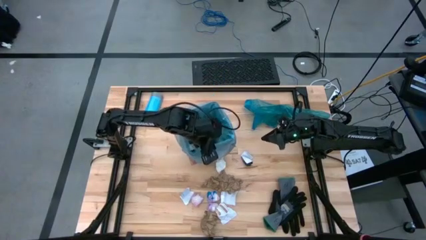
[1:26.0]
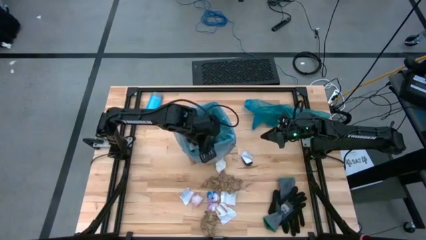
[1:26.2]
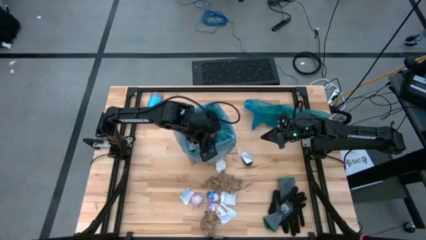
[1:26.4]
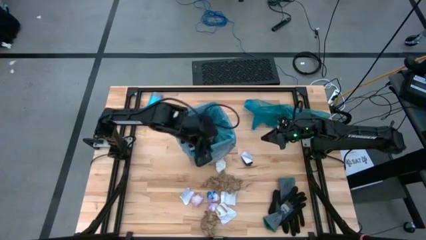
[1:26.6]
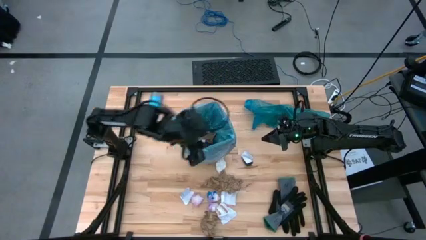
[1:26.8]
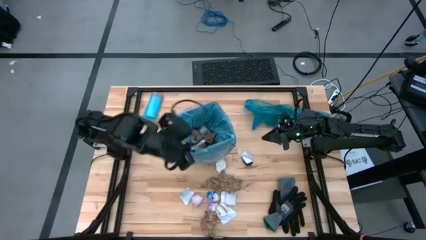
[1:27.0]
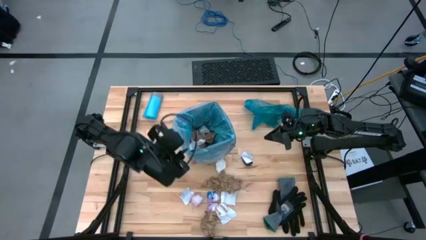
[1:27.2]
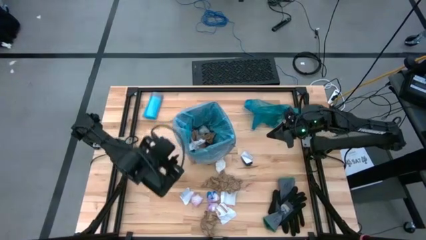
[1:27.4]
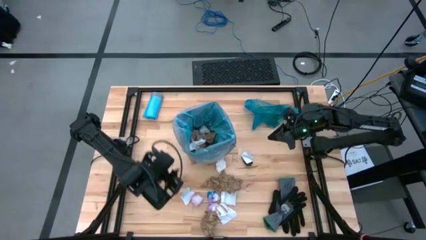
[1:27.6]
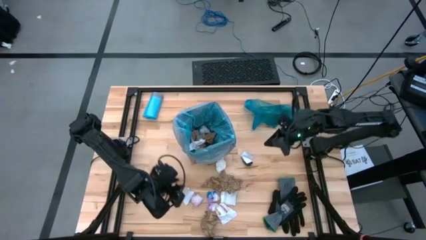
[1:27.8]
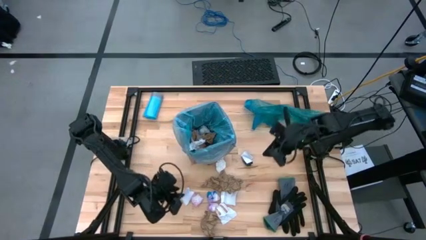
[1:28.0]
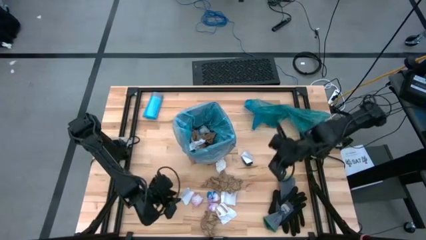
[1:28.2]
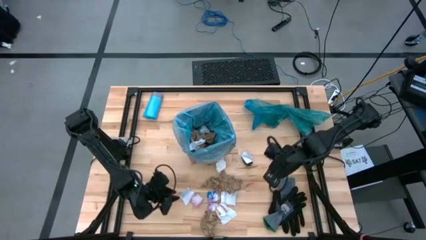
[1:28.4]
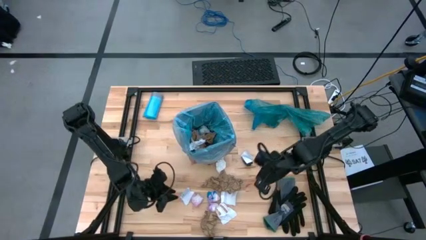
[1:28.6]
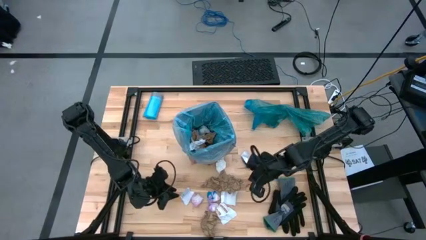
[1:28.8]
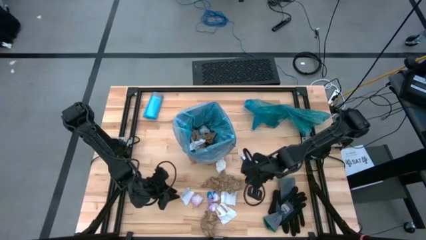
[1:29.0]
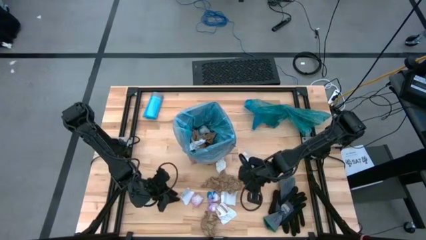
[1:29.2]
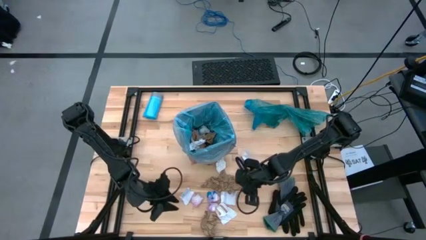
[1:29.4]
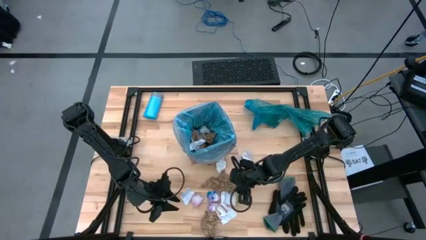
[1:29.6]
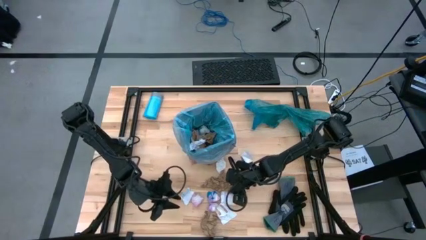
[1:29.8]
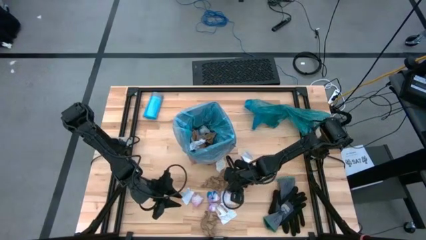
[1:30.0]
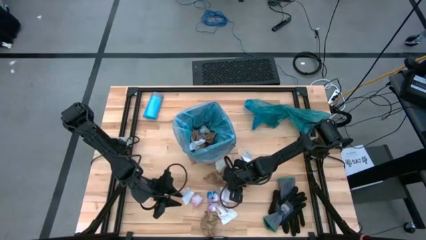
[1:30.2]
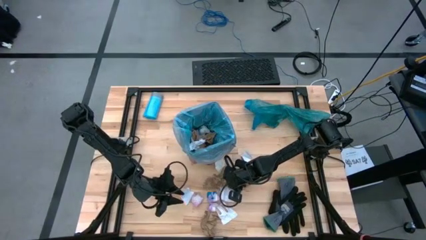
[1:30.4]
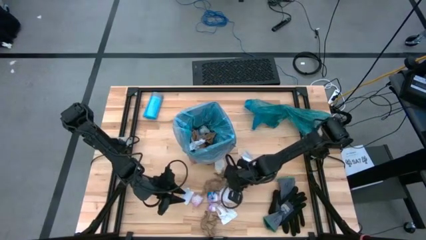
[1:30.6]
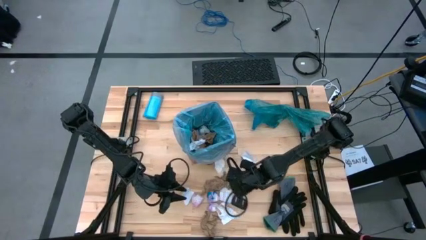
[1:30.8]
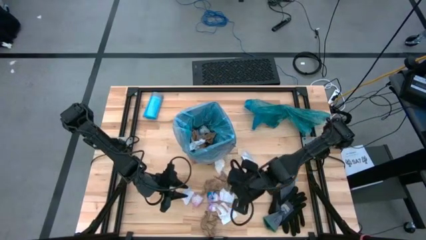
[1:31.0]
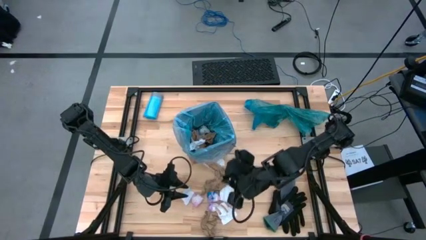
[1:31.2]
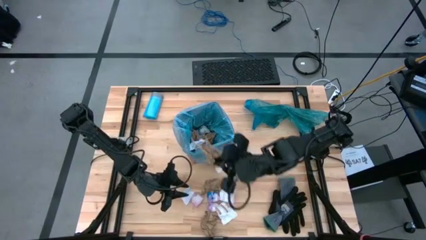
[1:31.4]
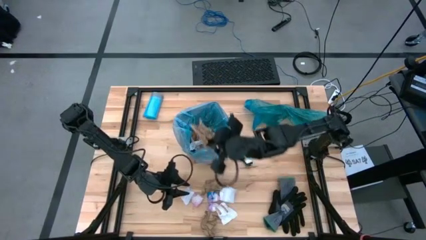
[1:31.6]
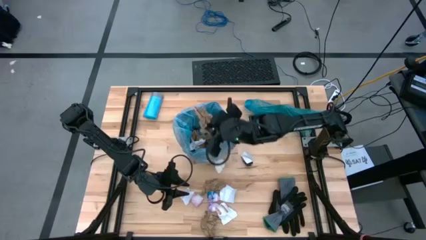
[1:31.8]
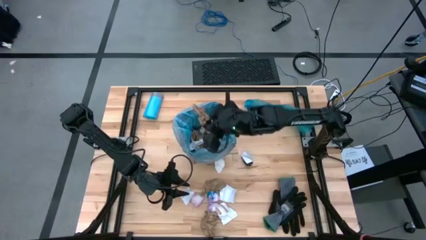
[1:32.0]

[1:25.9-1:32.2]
Task: place trash/remove bag and relplace
Put the brown paper trash into the trash bag

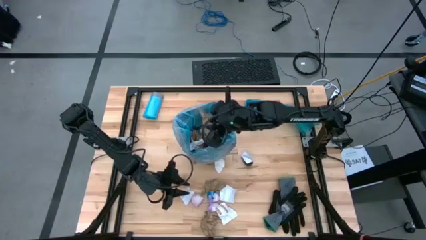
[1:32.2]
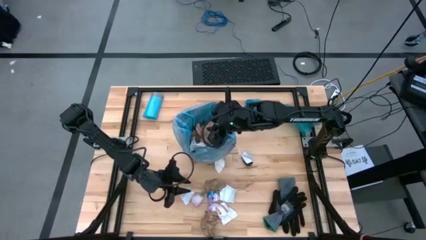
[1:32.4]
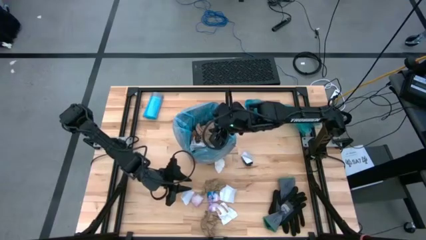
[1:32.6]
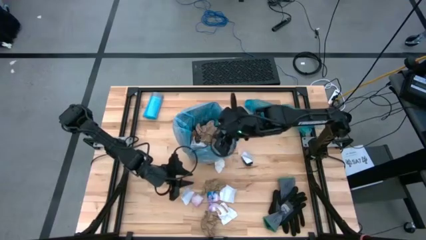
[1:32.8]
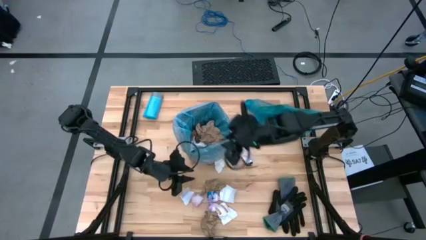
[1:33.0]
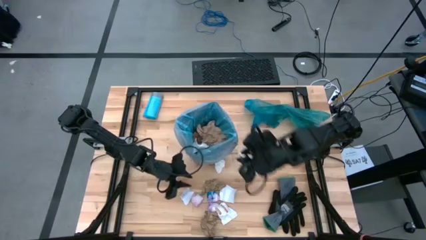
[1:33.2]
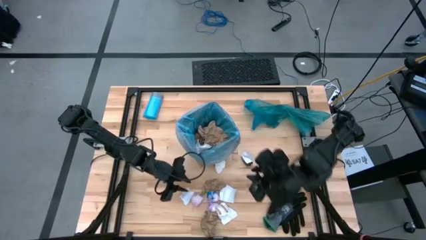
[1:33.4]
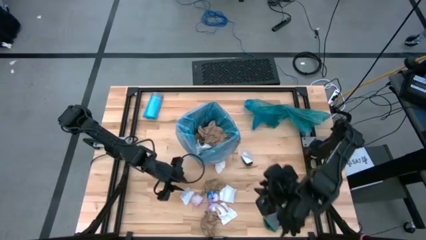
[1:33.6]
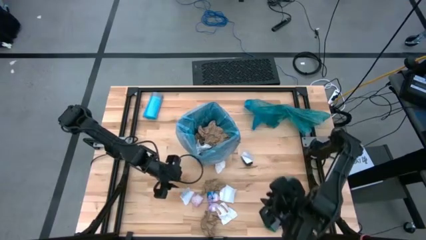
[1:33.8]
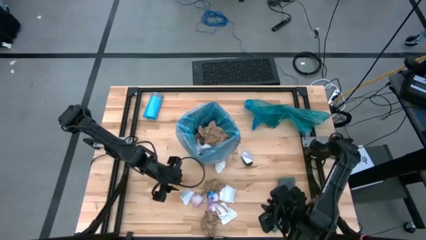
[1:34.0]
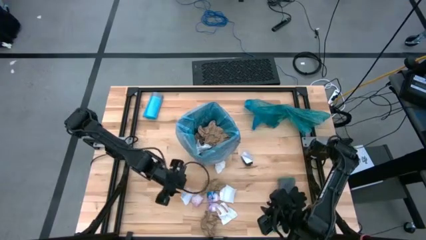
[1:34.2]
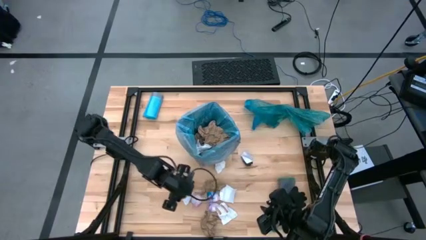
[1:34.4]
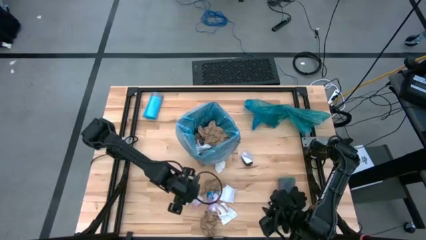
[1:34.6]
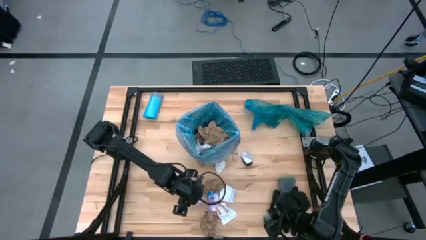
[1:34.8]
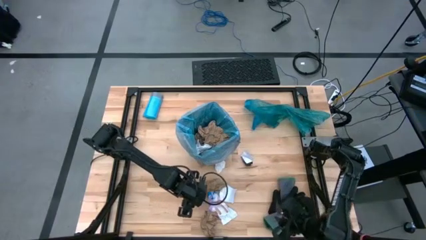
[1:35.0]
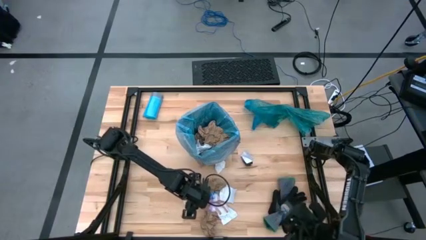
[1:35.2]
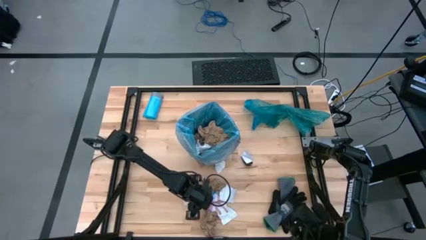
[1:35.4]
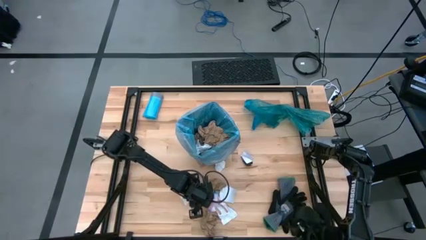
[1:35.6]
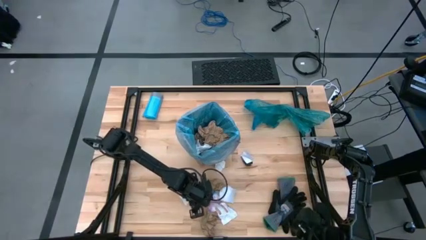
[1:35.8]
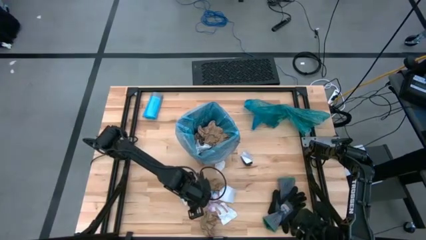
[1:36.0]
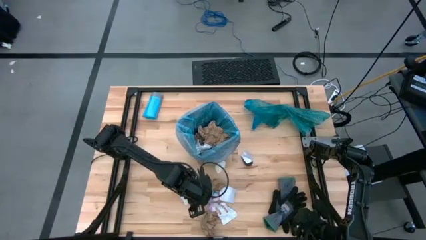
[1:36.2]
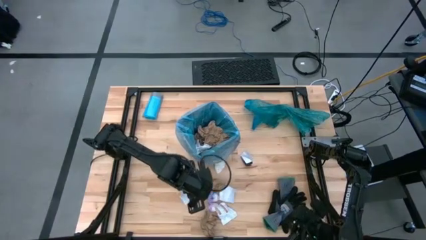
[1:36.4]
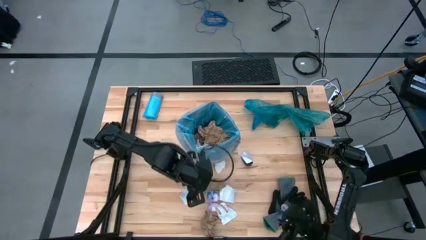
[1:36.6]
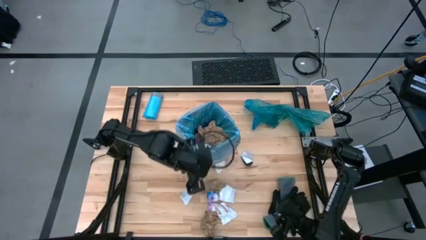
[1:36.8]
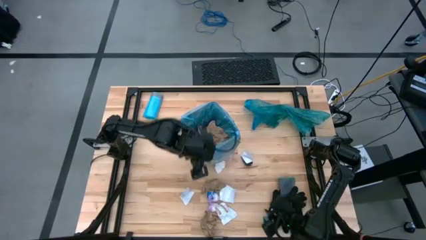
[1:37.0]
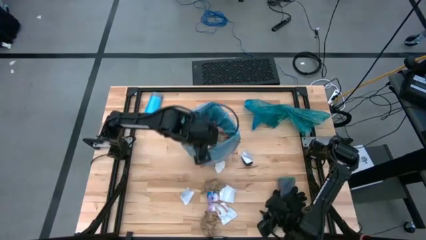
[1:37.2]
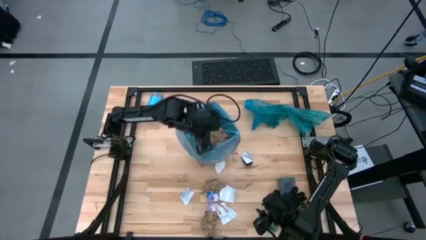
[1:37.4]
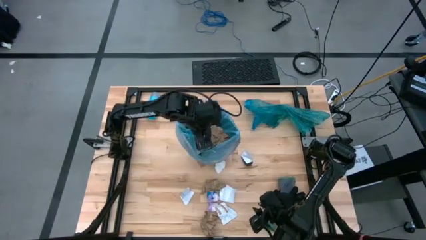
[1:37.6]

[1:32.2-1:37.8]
Put the pink plastic trash into the trash bin

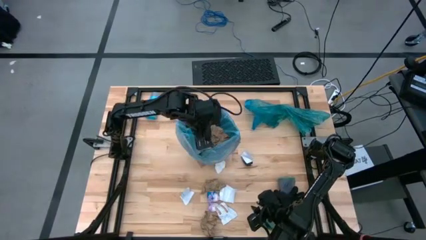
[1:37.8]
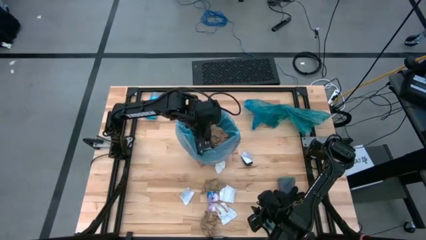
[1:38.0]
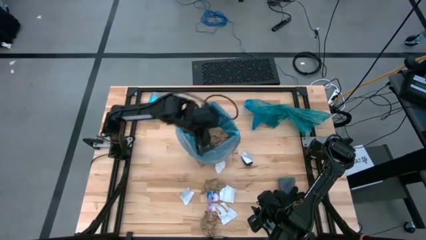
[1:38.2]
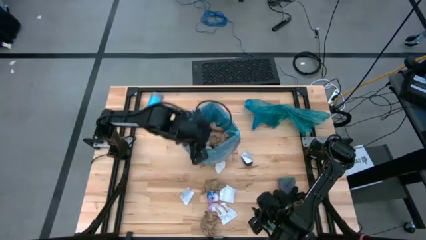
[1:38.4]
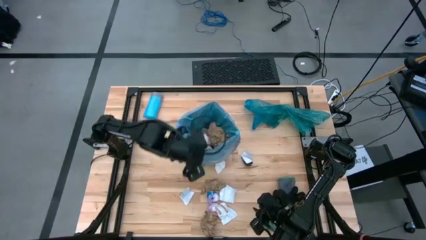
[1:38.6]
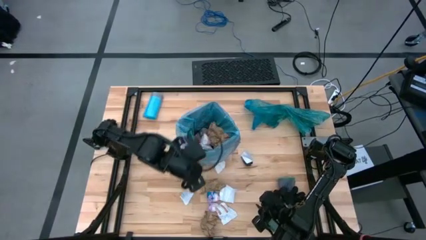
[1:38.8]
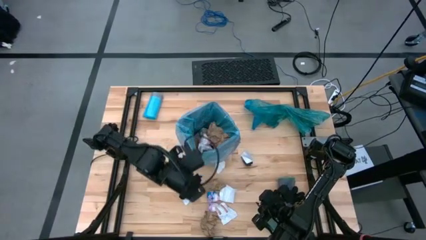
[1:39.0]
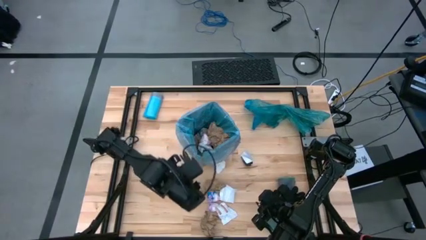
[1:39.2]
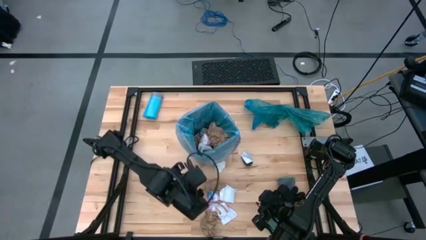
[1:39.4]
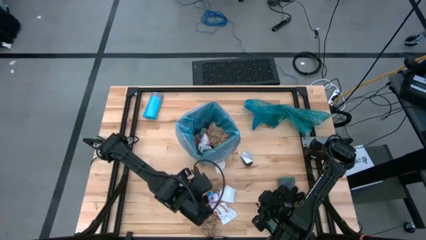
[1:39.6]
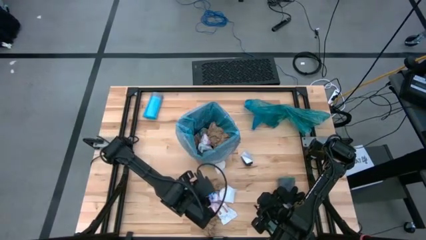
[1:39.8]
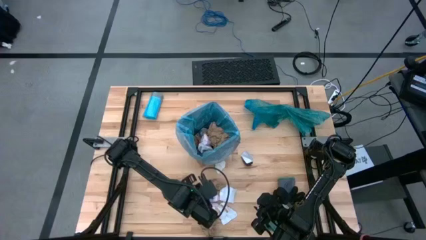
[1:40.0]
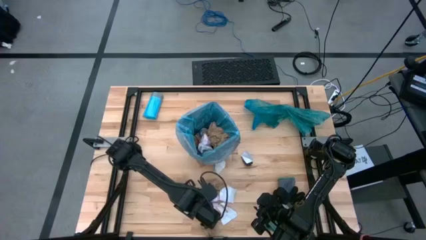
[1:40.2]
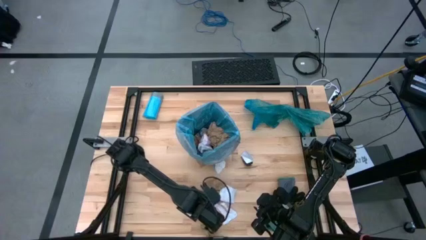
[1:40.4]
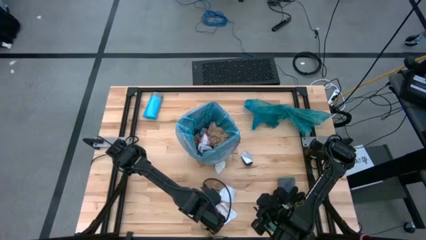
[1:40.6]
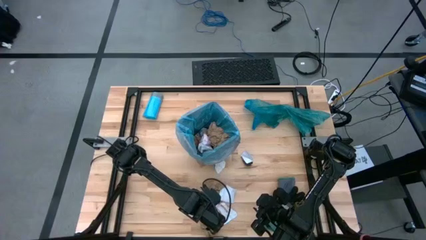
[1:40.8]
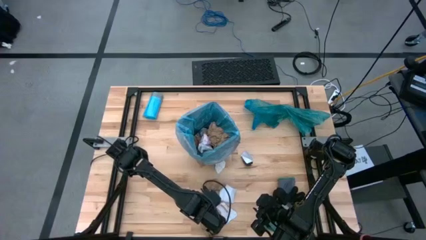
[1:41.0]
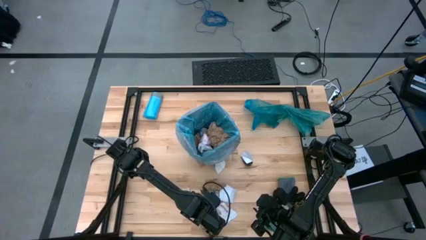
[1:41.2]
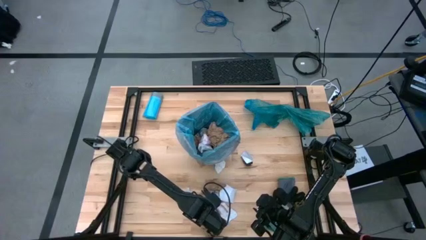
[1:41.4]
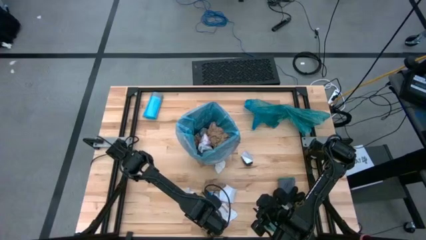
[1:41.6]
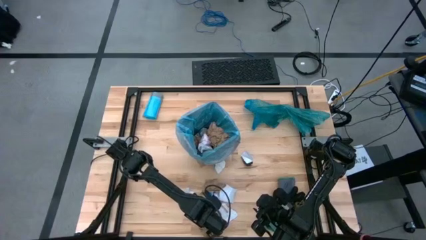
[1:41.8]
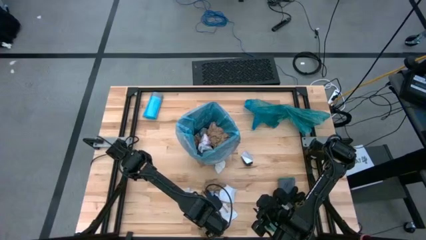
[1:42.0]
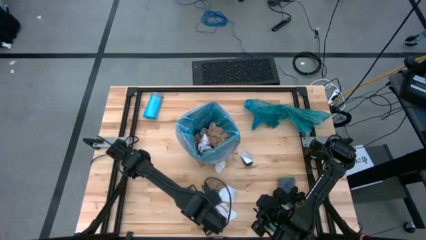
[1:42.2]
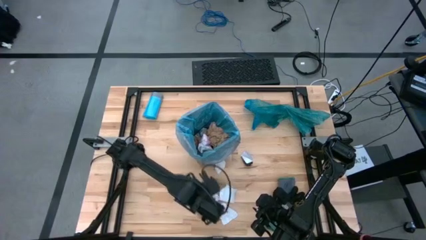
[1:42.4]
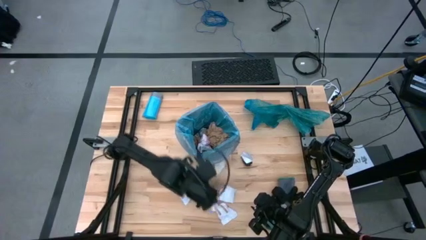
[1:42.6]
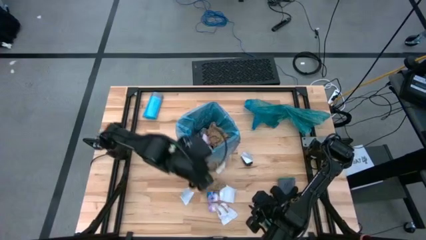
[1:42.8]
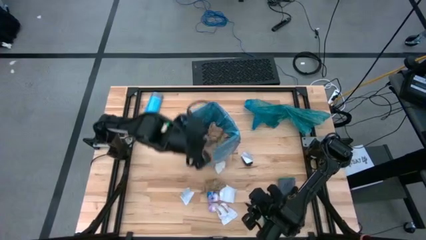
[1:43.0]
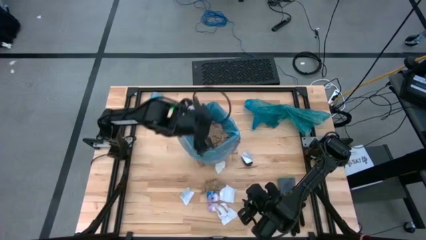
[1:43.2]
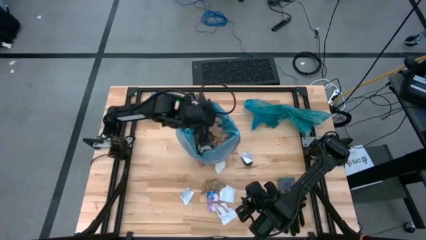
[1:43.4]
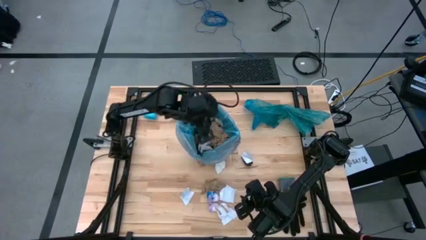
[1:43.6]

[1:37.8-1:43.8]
Put the brown paper trash into the trash bin
